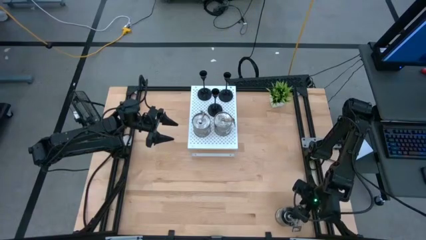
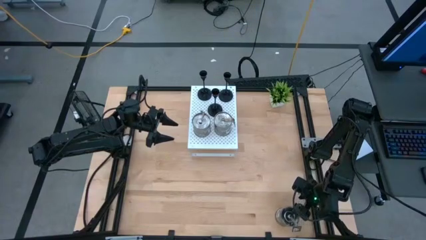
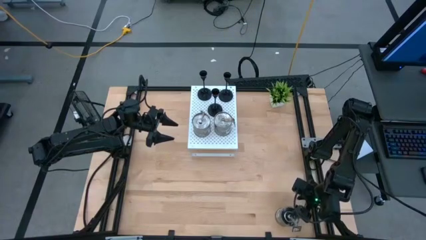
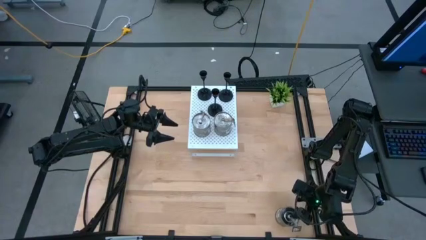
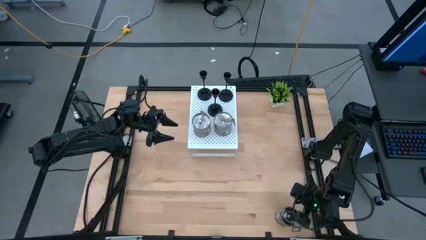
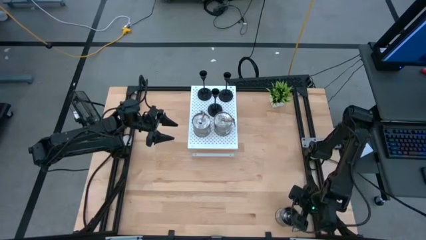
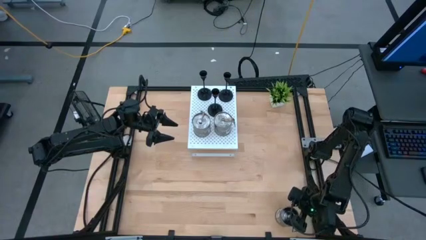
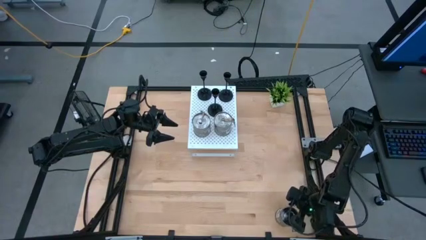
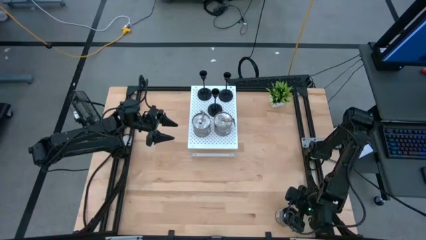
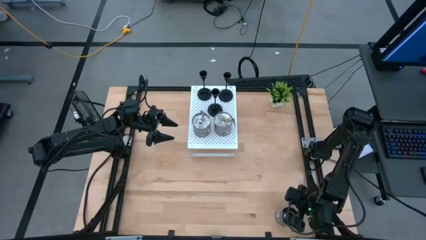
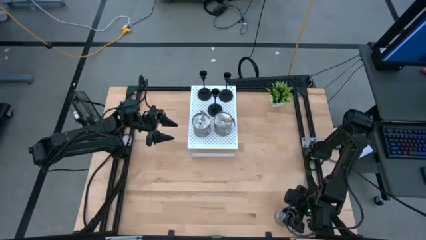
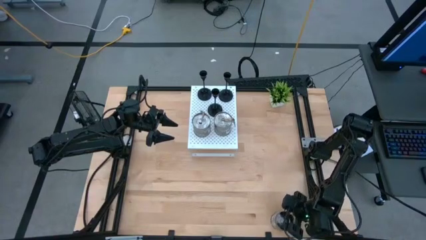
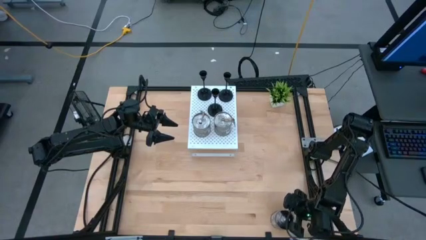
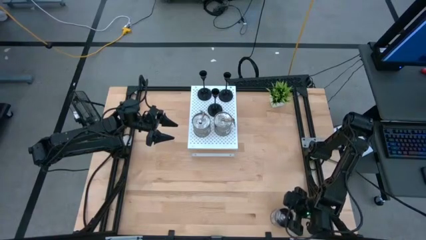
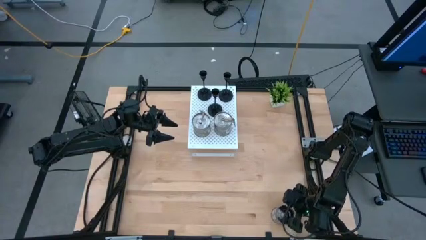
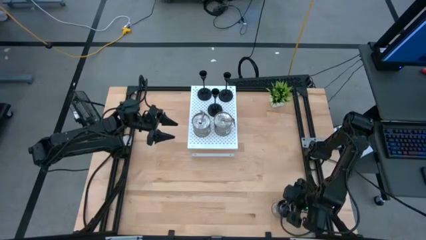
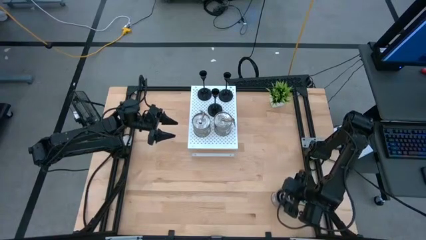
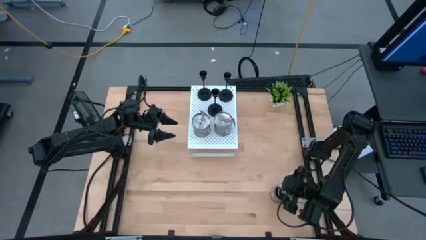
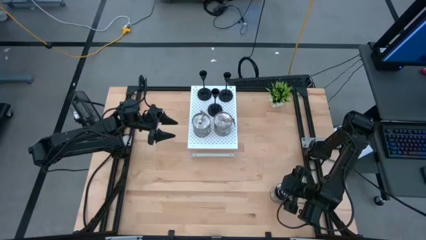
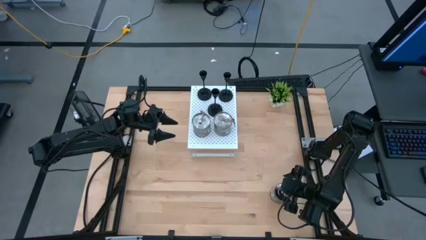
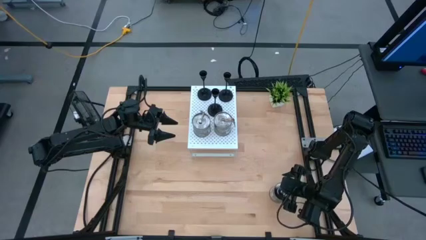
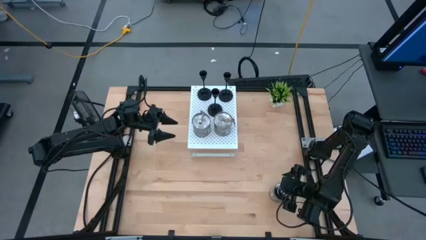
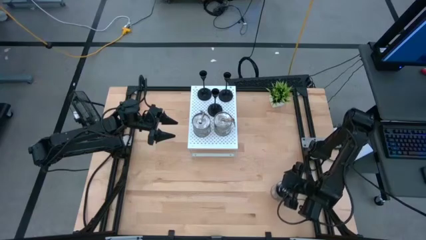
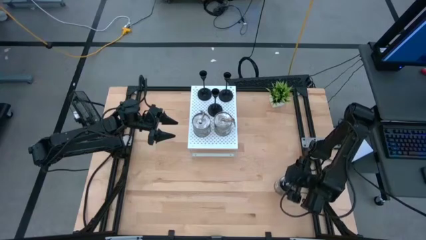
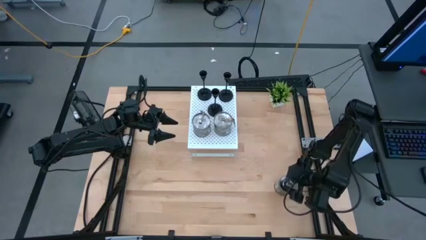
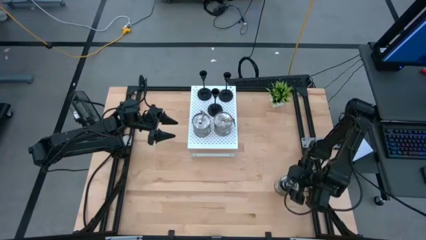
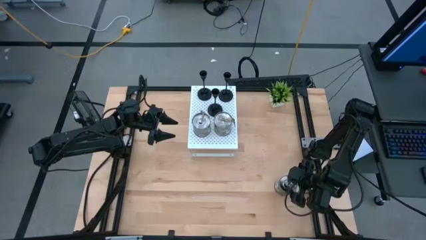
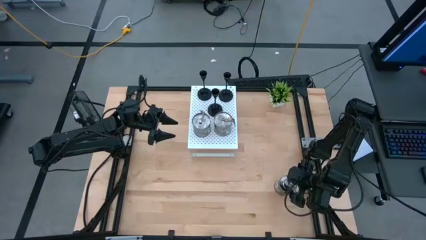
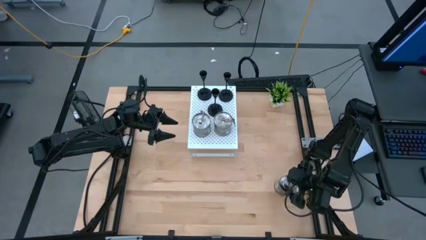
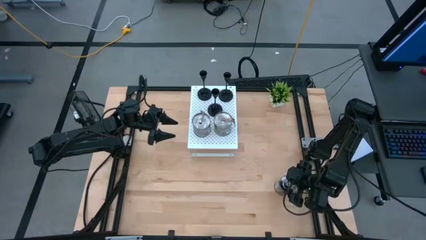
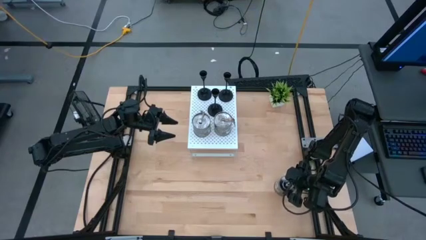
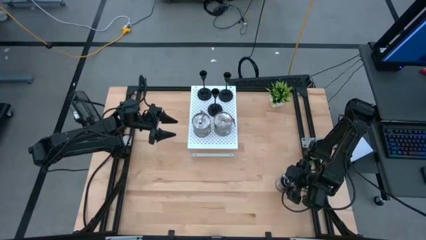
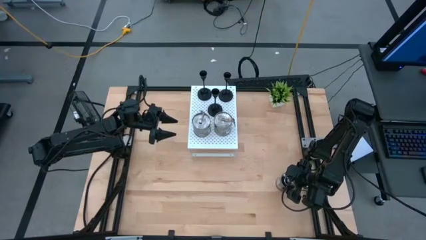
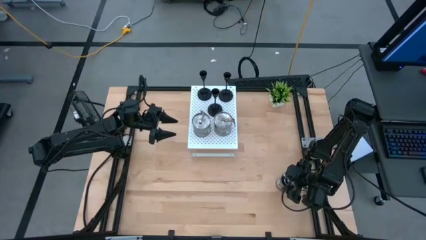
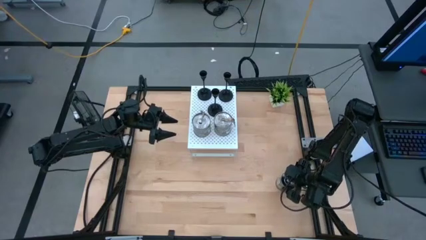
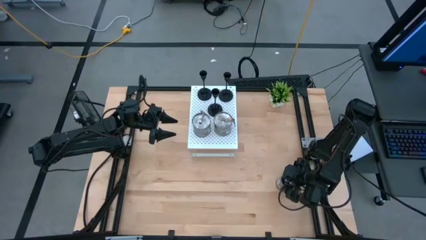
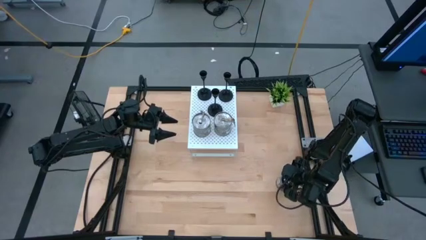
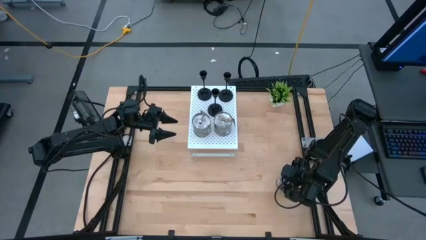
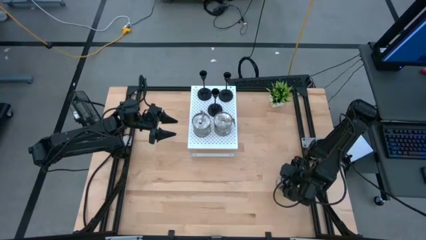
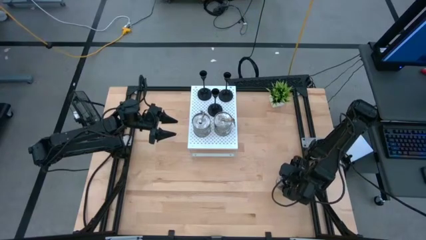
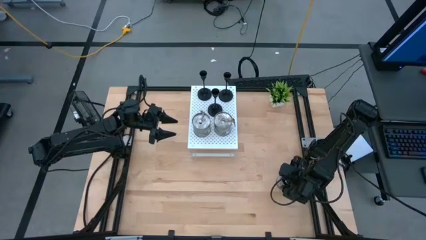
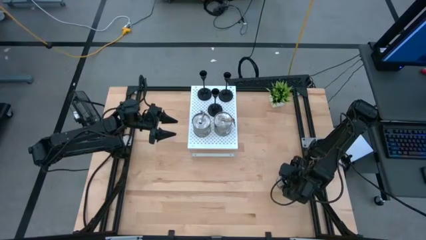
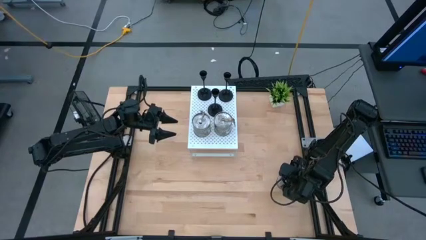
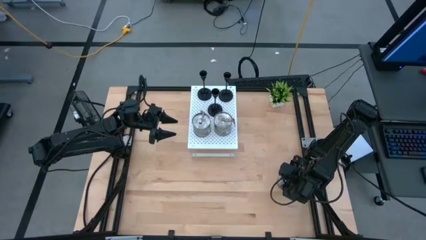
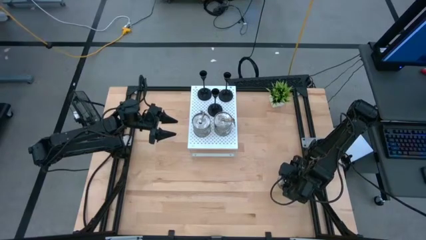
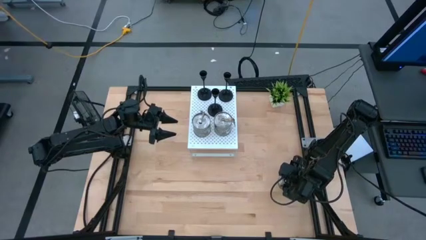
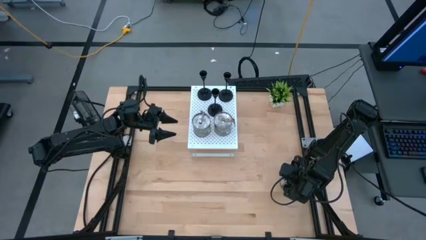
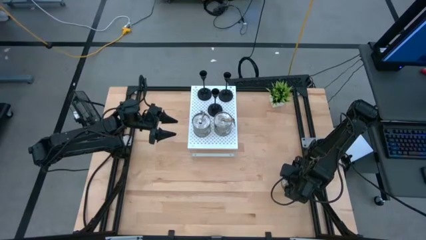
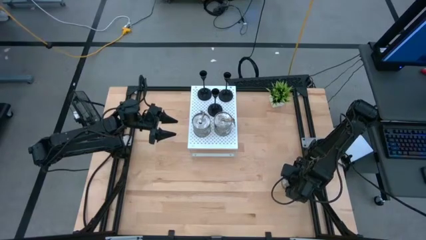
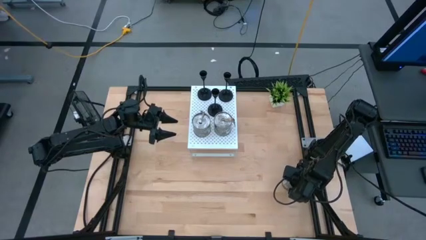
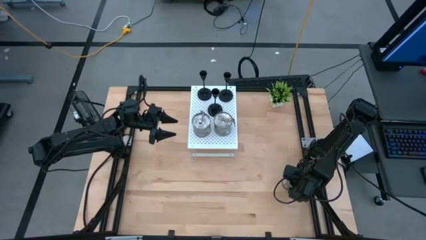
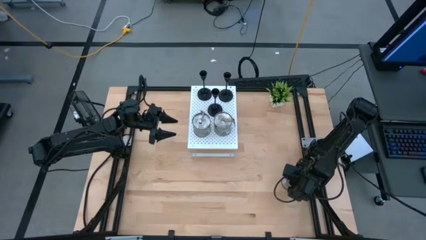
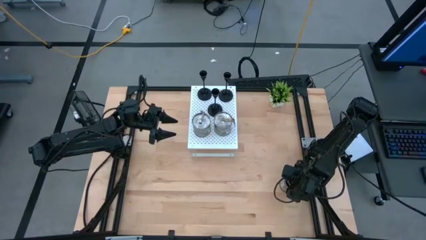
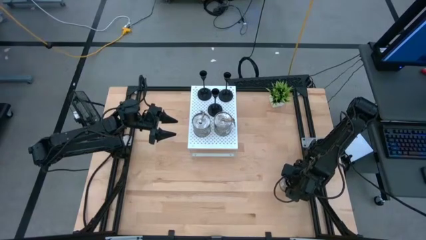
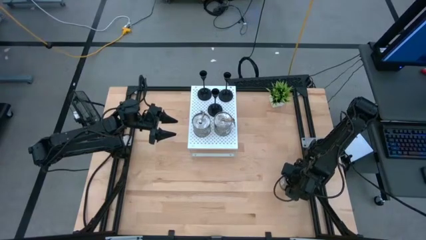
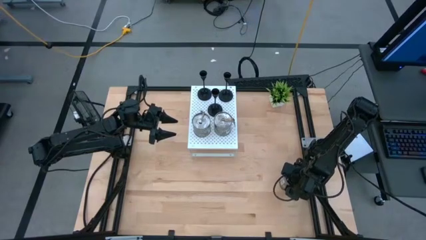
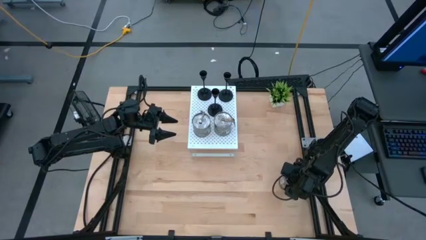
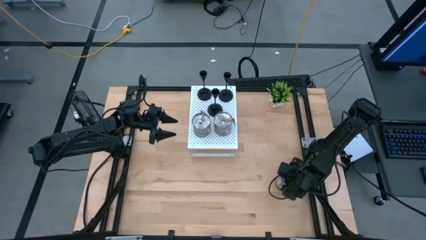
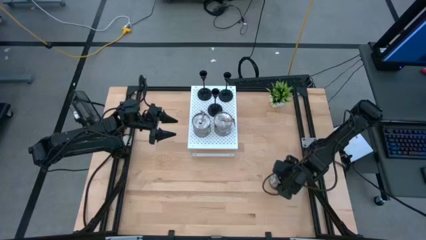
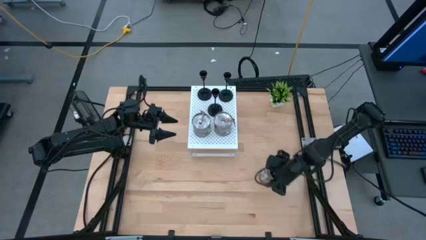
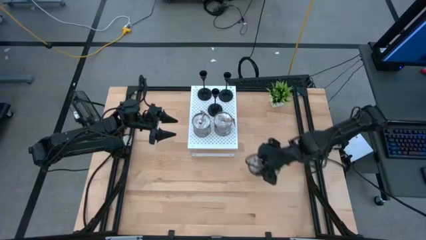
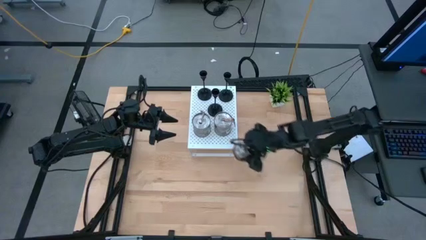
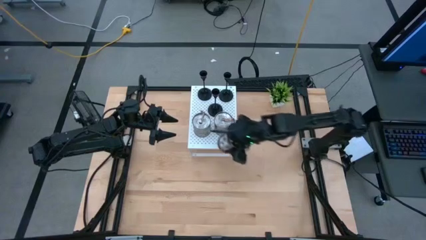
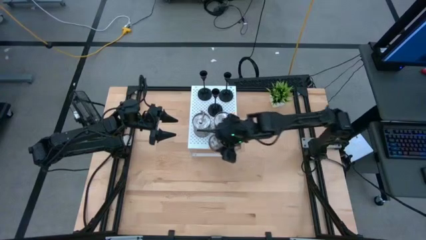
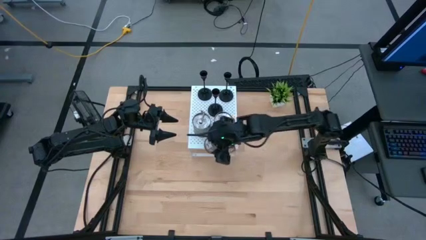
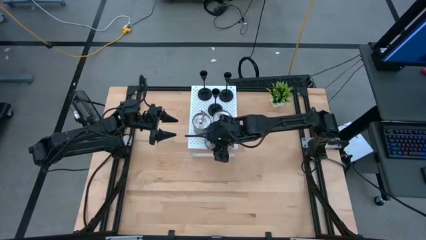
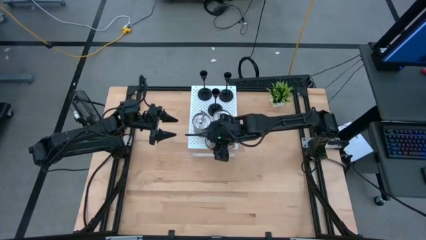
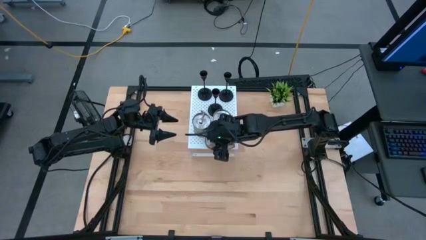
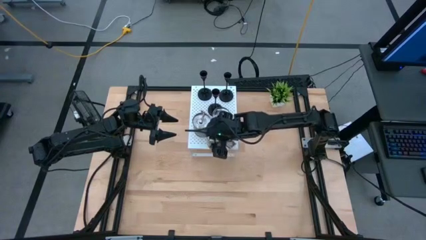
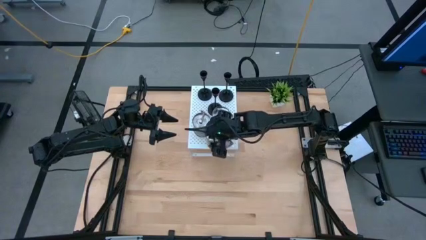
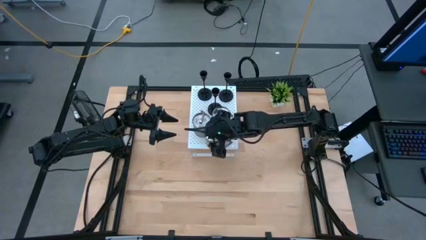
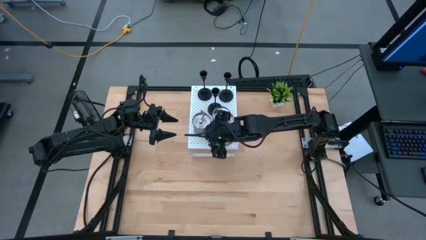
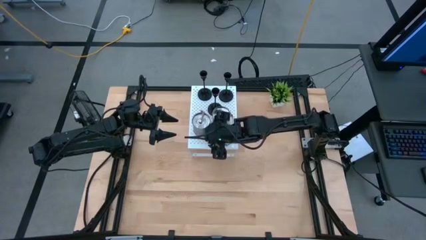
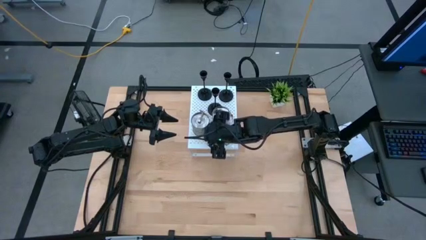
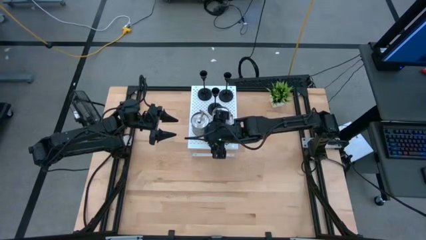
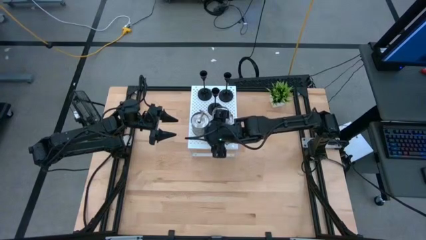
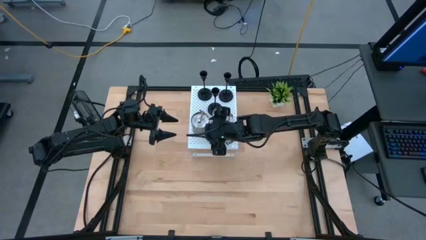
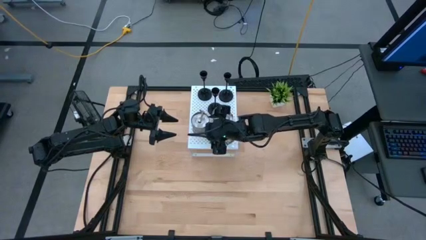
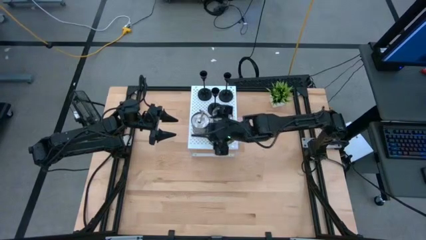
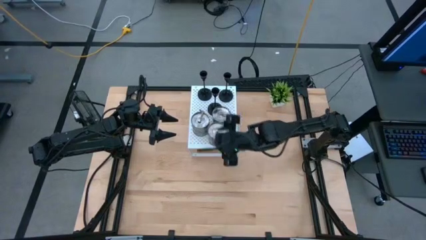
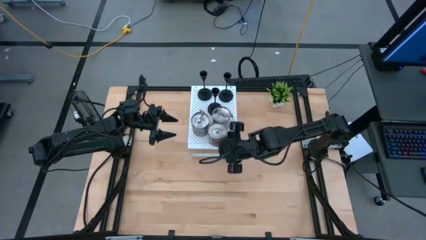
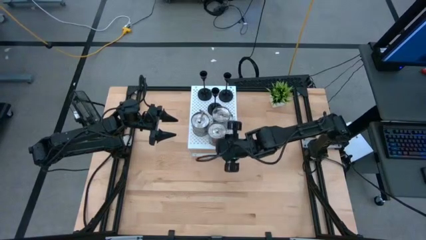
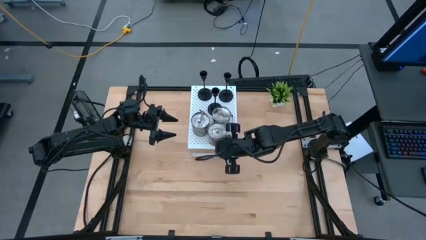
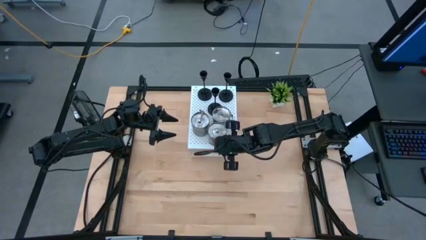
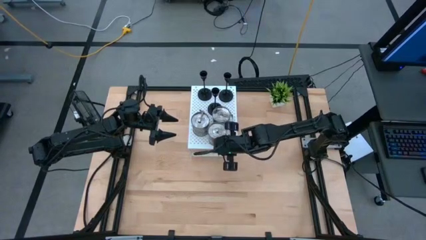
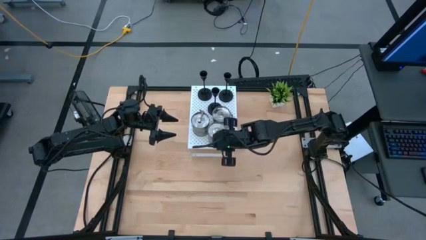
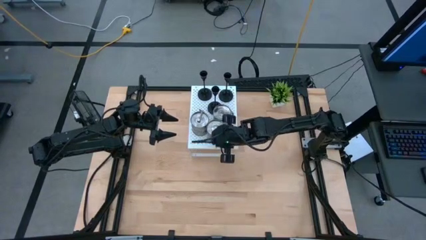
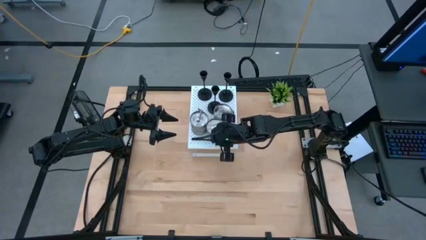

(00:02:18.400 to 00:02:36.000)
Task: Pick & Place candle stick holders
Put the brown scented candle on the shelf
